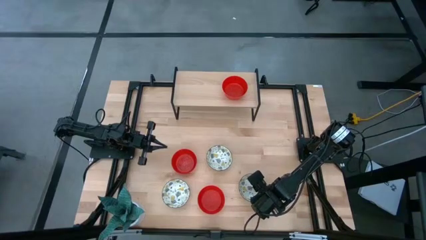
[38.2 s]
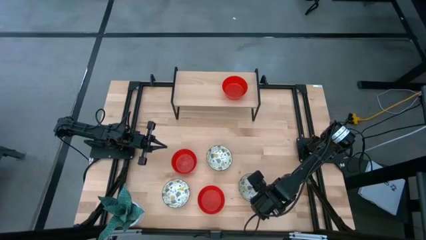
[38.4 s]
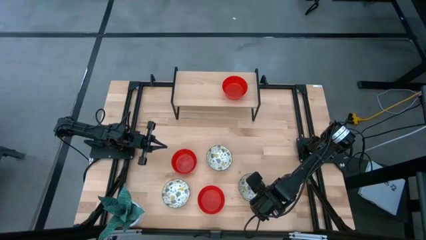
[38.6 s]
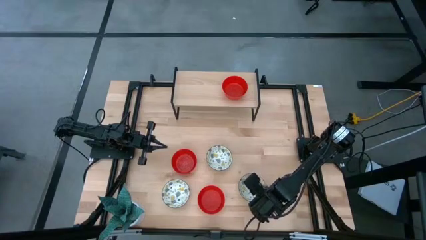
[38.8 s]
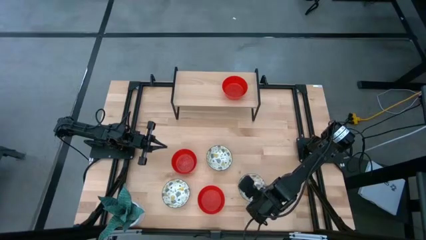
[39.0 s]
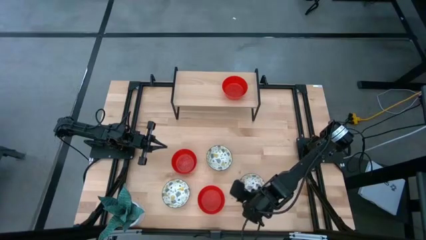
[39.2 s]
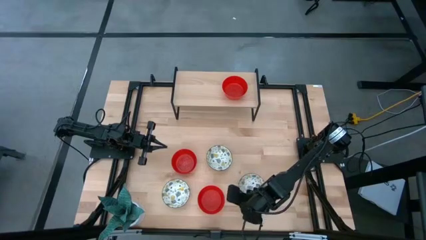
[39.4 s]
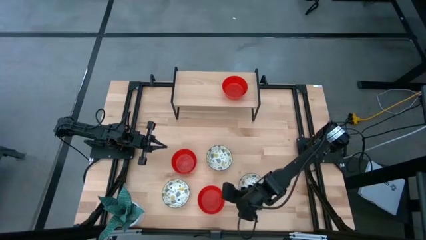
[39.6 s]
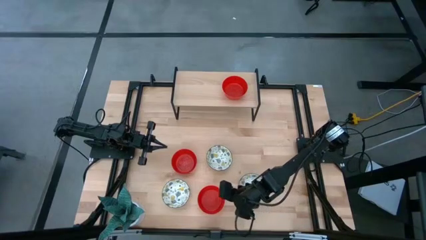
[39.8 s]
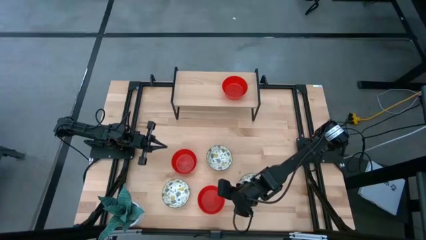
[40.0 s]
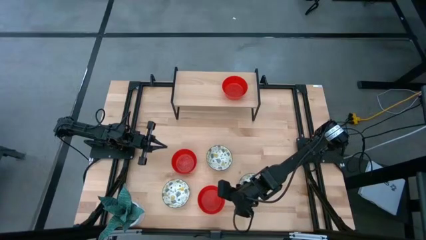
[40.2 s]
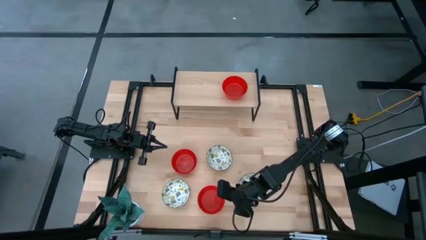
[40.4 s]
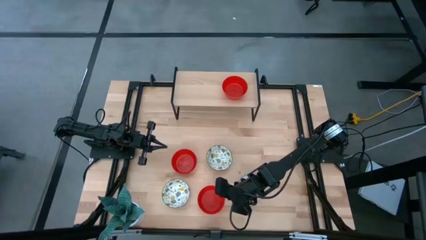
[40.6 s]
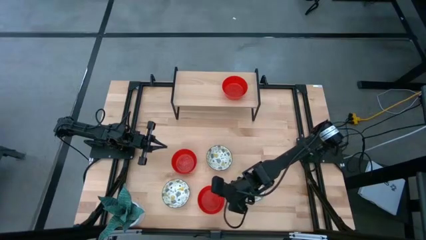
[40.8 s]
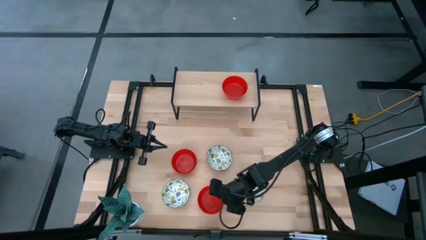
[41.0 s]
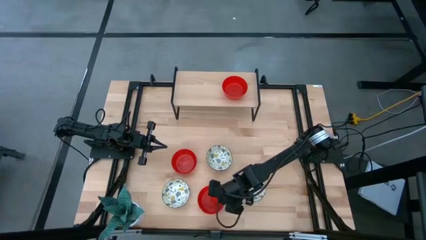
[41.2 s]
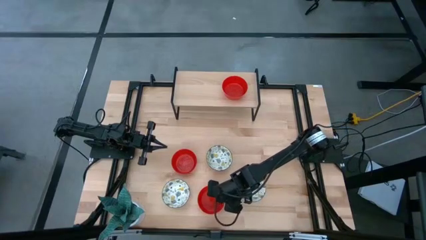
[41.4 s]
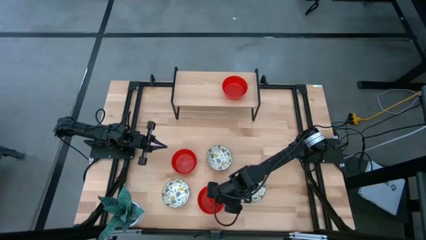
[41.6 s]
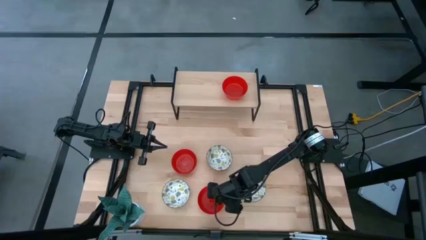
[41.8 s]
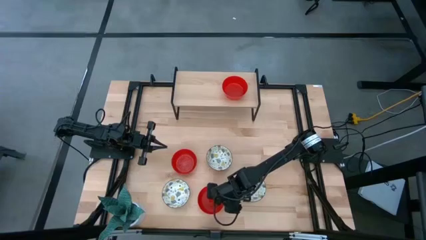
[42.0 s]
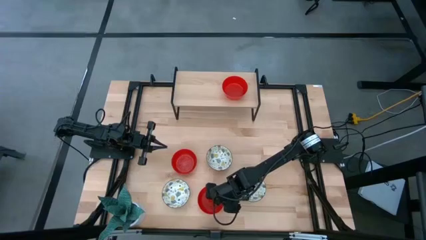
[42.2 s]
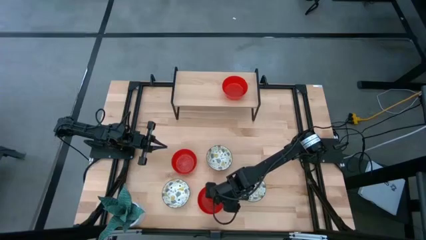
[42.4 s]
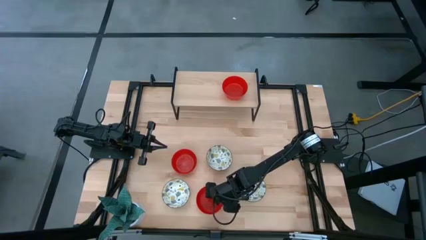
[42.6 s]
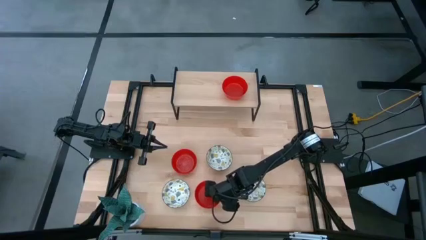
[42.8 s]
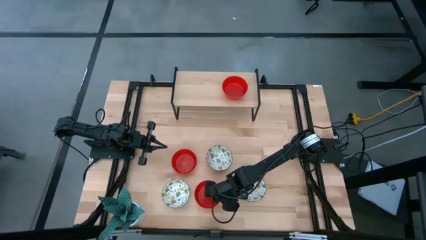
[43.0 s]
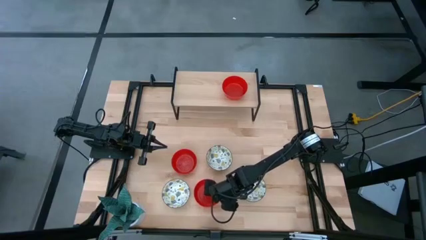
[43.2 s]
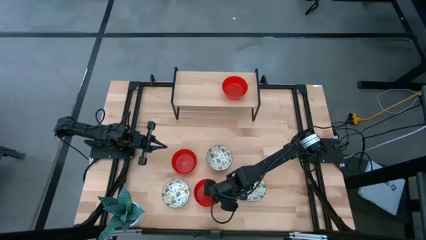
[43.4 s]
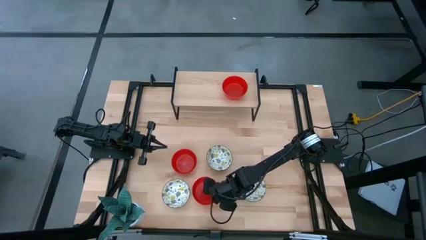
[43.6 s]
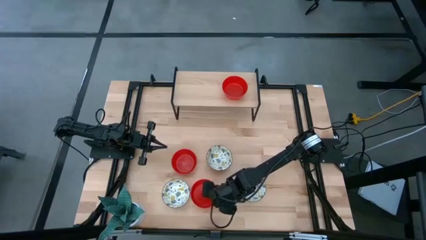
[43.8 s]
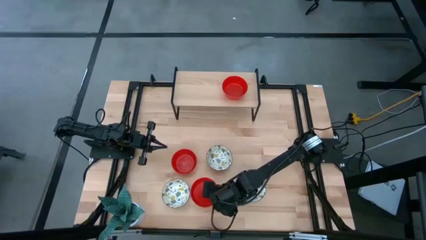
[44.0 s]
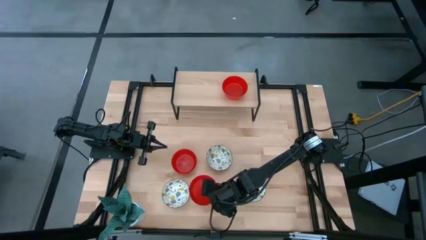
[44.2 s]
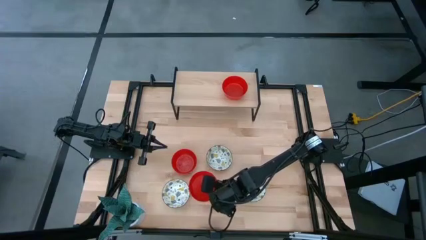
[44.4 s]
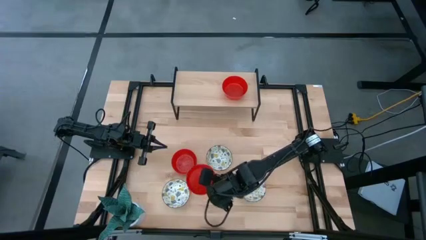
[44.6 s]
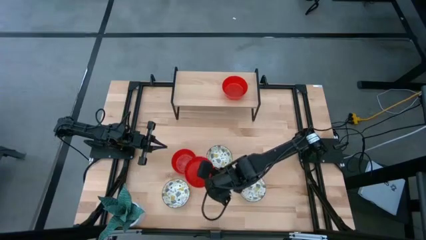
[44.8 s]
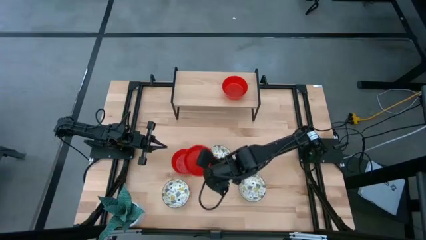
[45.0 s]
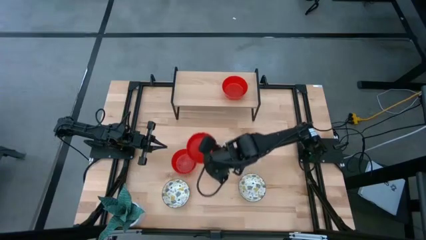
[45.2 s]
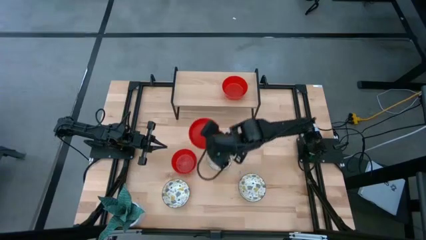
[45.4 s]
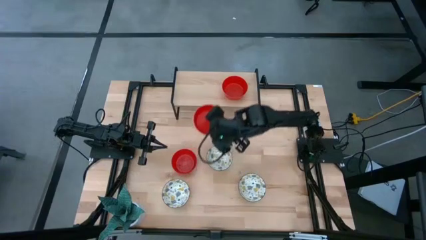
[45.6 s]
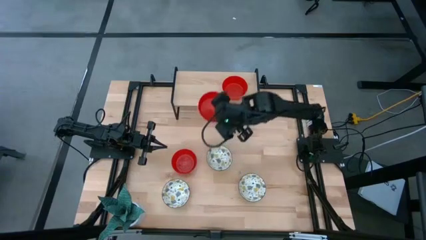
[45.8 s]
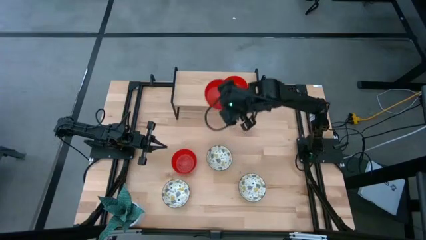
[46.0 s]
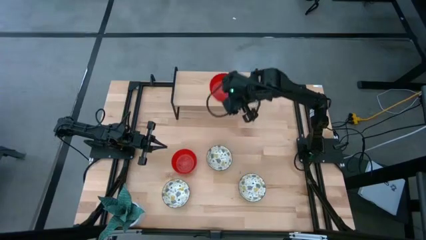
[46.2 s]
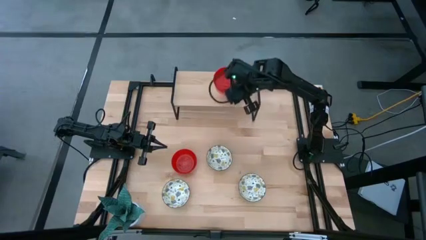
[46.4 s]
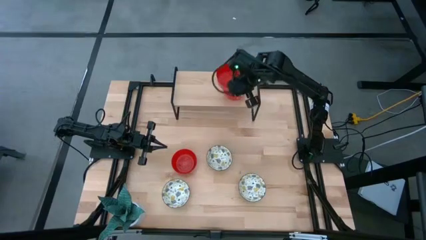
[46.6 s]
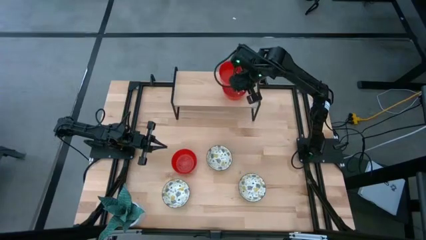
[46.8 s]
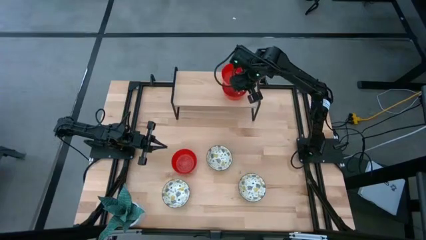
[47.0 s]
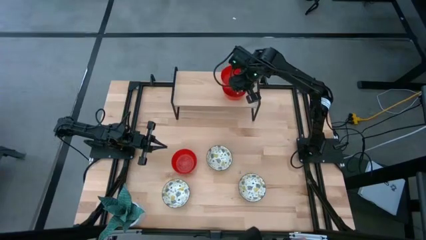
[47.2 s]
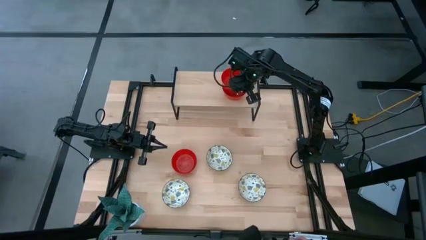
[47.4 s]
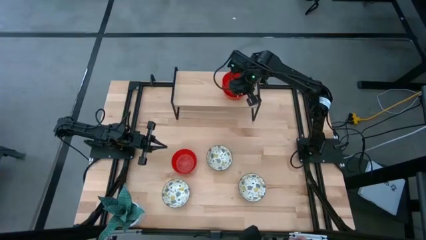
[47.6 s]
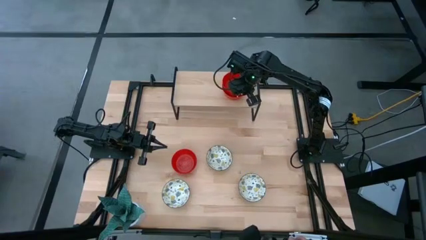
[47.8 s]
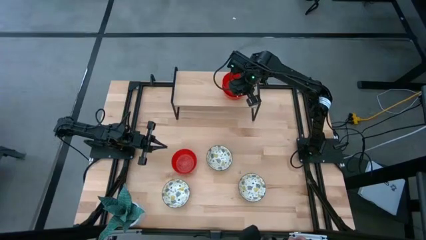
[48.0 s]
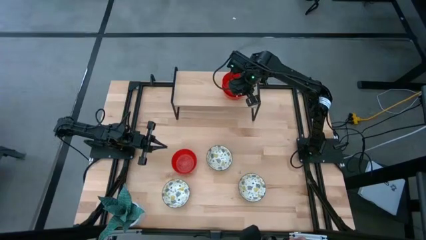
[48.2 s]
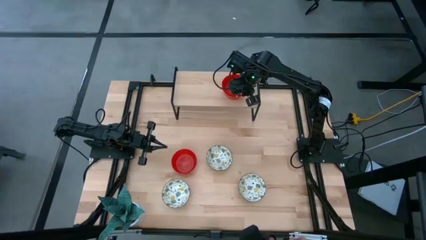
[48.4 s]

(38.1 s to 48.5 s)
Task: Pick & Place Mini bowls
Stack the bottom red bowl on top of the red bowl on the shelf

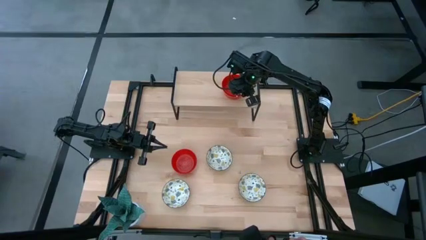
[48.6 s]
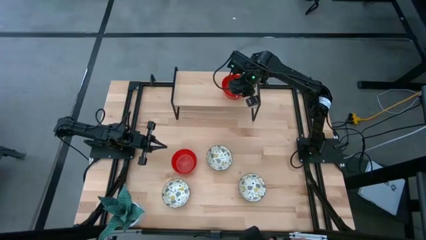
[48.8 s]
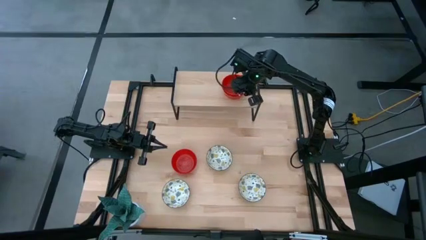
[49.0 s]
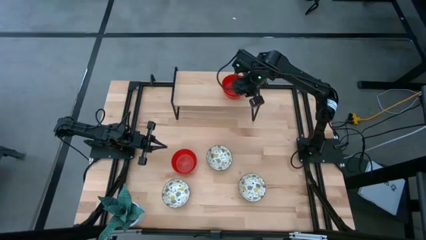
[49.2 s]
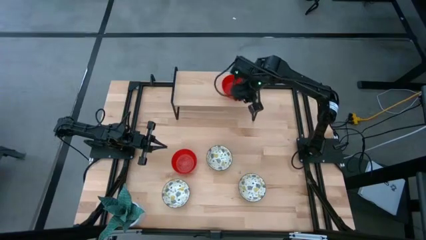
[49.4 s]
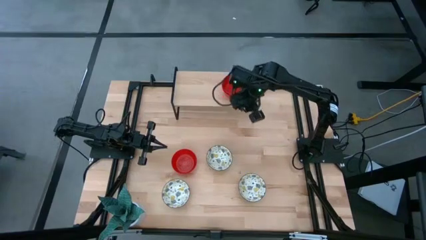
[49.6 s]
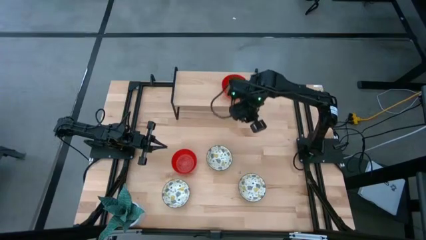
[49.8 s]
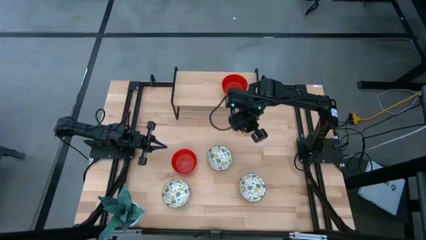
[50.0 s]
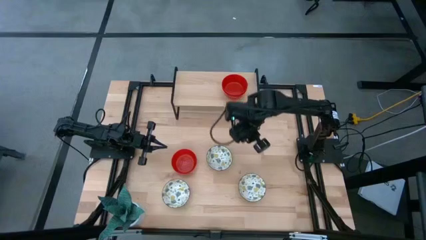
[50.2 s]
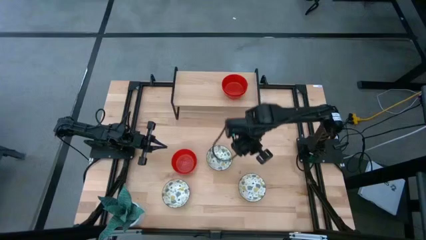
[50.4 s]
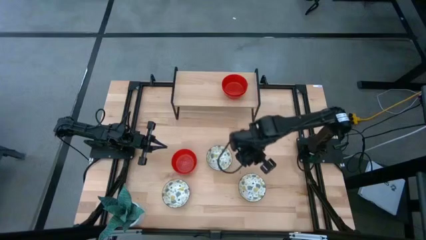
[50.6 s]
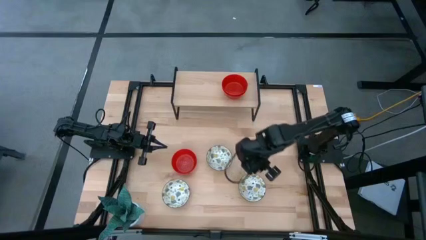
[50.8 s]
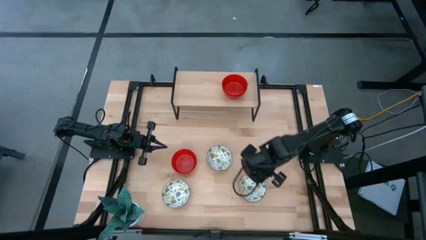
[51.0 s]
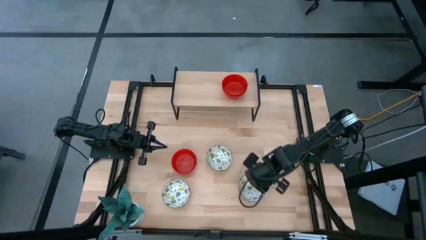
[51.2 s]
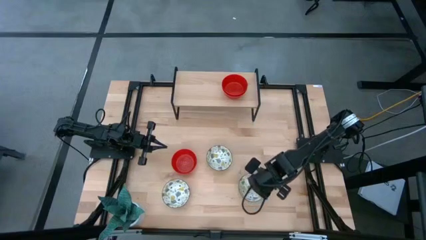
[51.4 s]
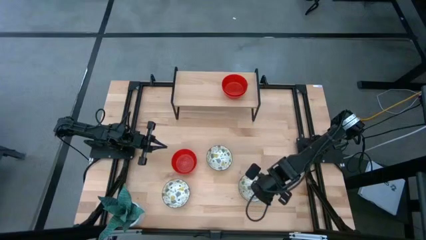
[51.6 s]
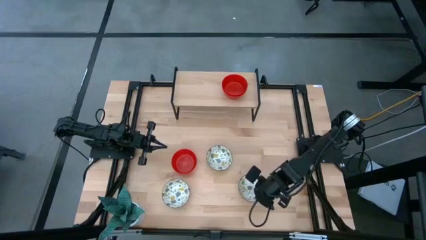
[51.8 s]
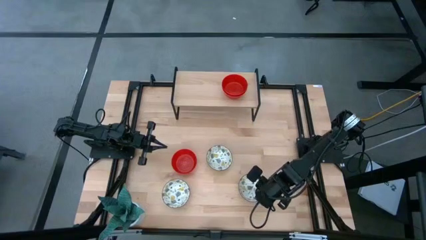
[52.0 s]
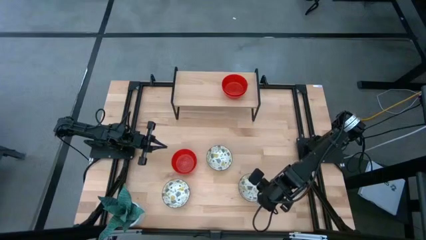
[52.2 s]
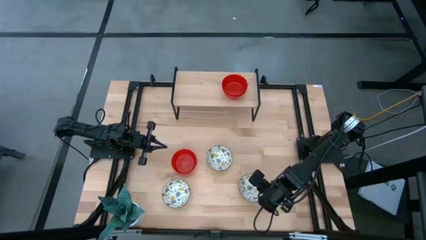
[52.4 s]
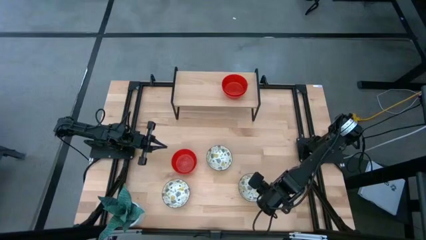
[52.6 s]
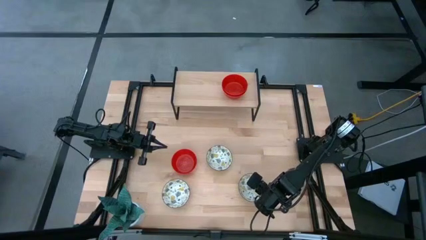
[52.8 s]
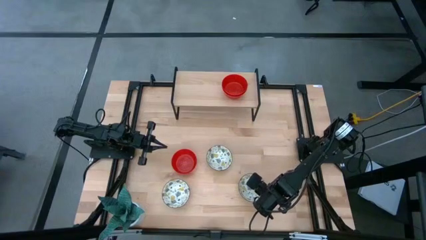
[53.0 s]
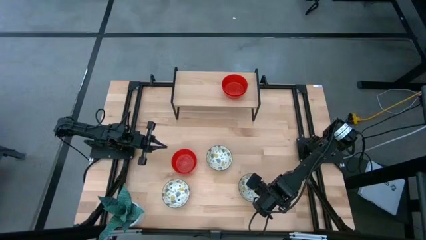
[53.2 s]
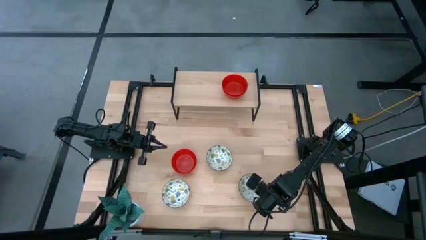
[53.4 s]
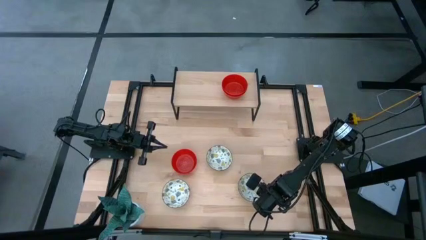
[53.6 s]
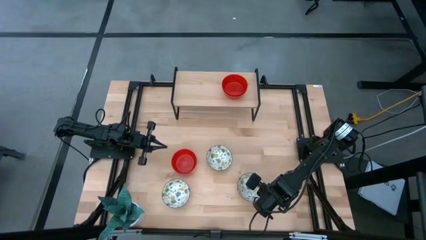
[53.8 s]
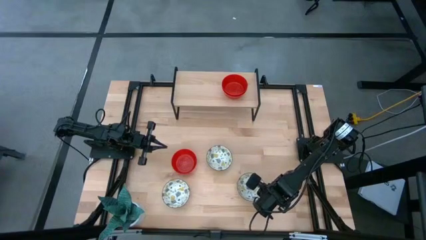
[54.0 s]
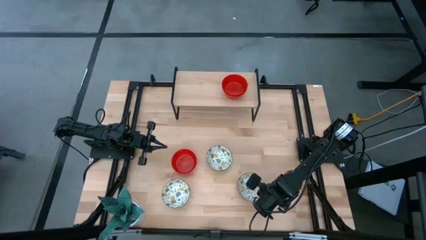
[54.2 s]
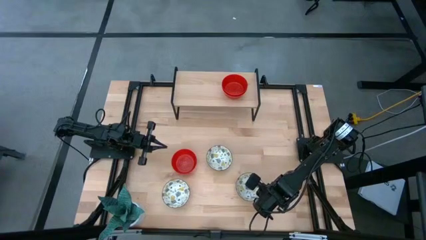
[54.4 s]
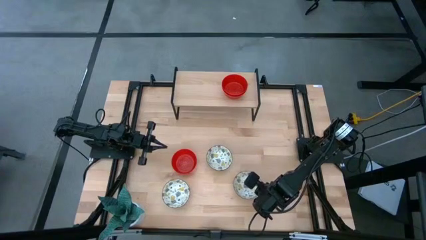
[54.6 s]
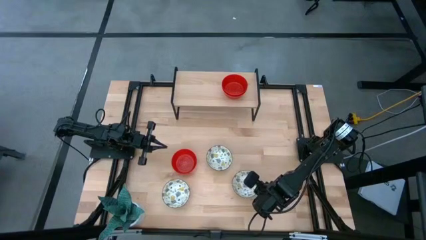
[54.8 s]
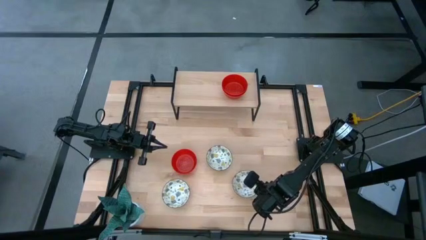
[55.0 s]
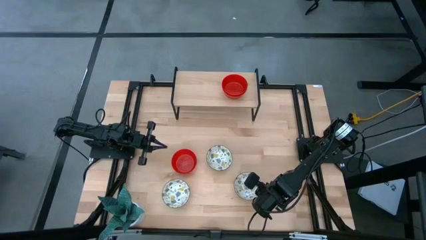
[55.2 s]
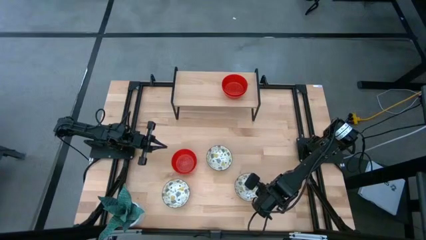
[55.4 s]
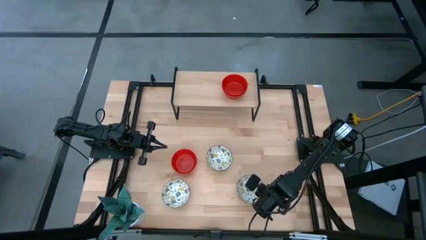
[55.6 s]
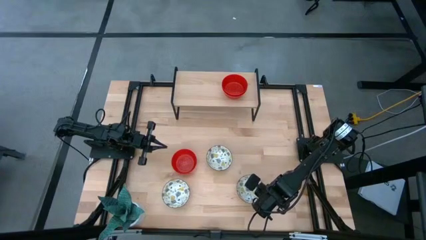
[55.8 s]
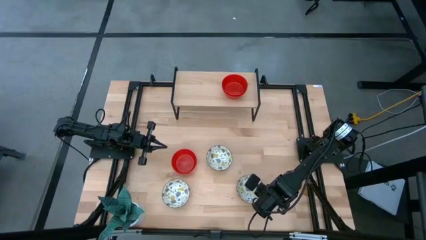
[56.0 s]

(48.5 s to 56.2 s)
Put the right white patterned bowl on the shelf
